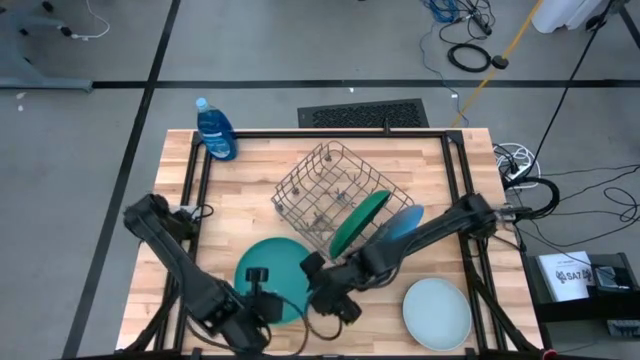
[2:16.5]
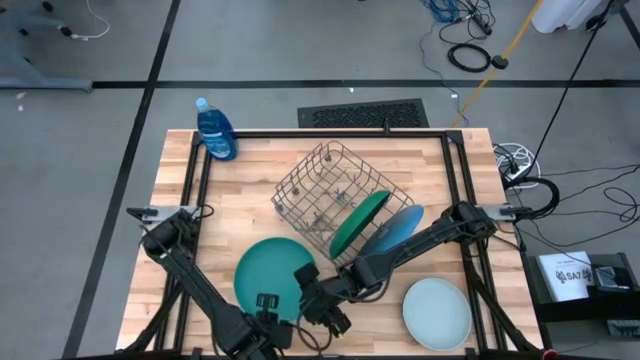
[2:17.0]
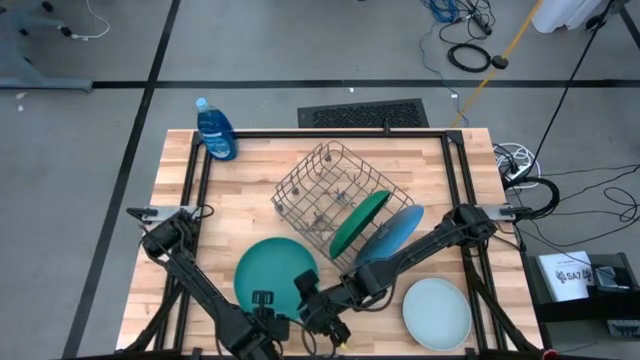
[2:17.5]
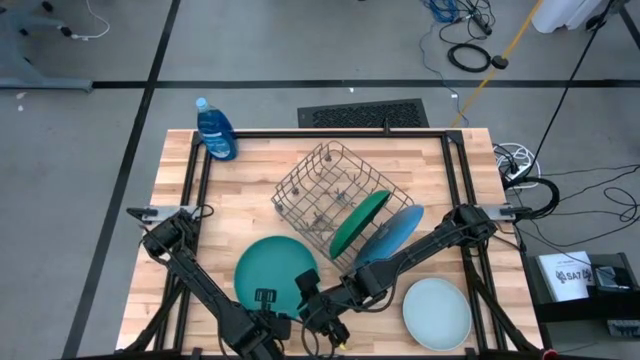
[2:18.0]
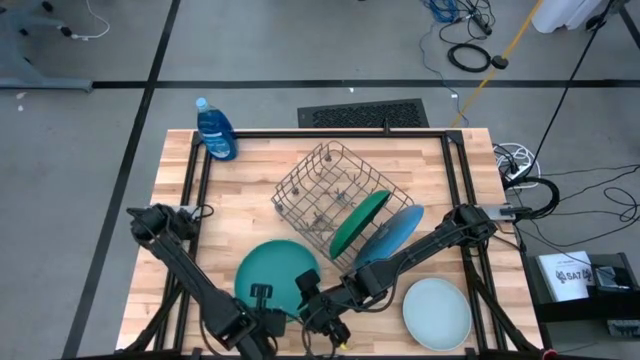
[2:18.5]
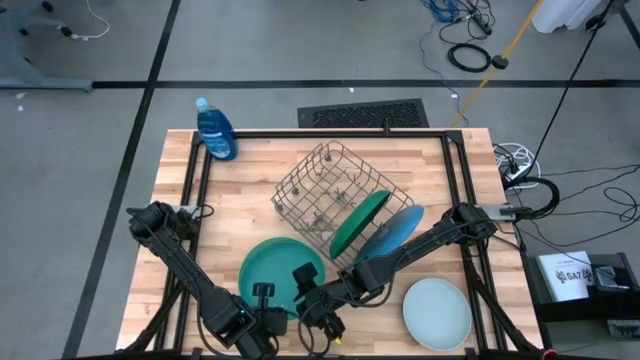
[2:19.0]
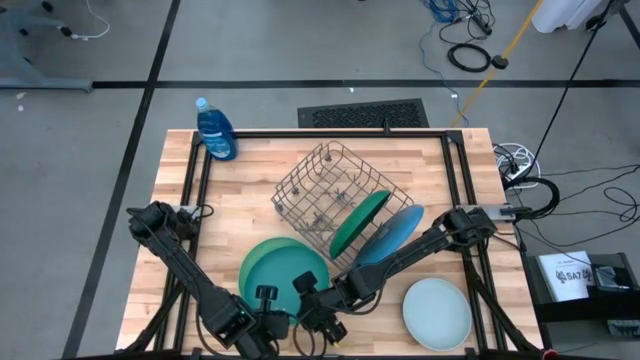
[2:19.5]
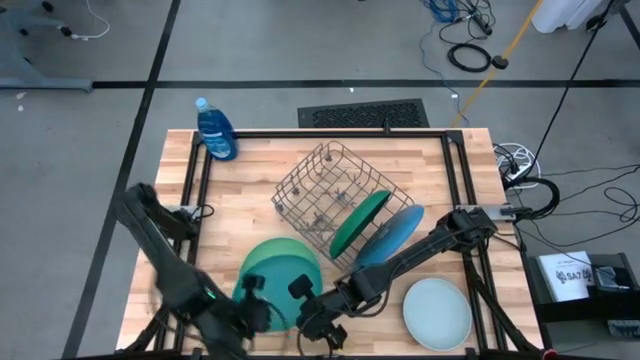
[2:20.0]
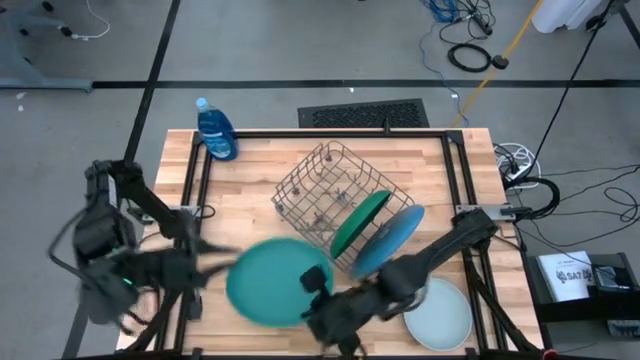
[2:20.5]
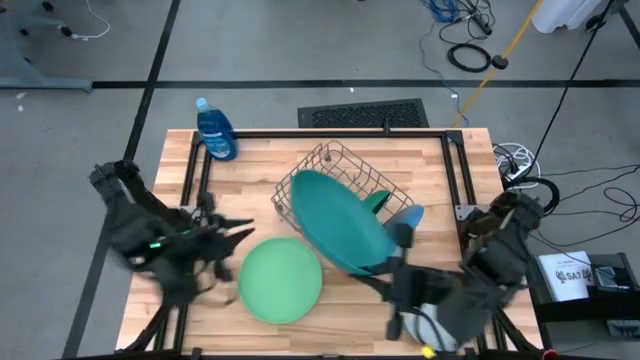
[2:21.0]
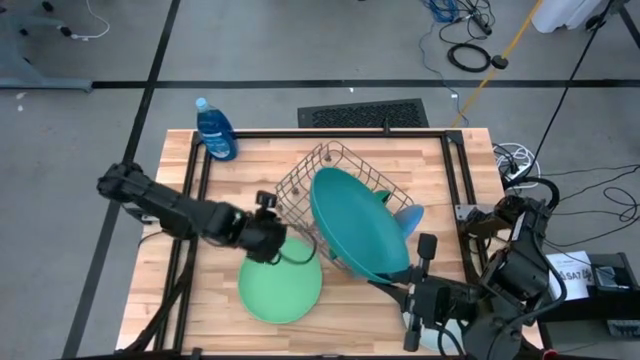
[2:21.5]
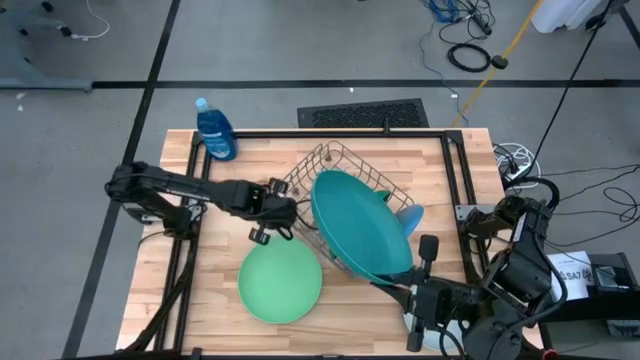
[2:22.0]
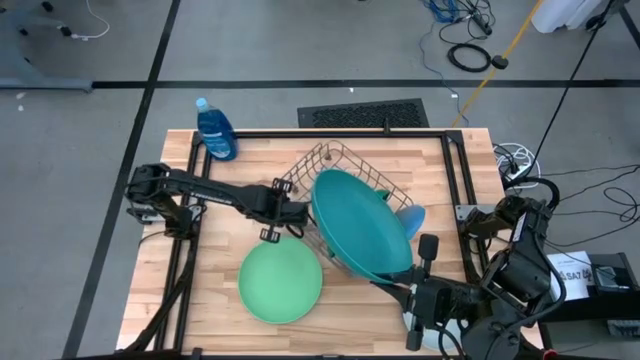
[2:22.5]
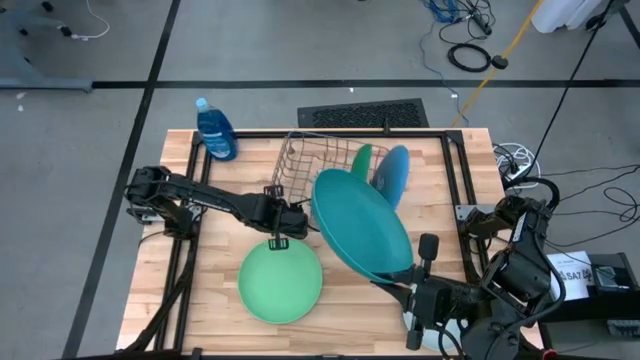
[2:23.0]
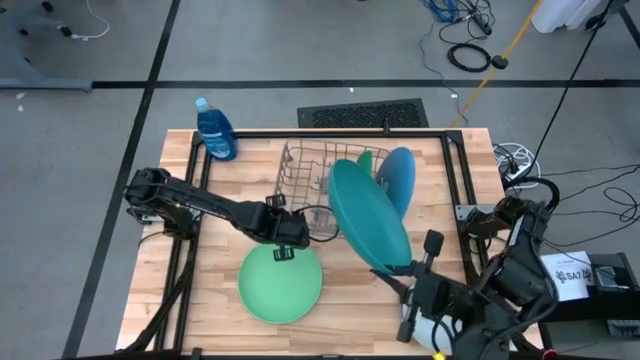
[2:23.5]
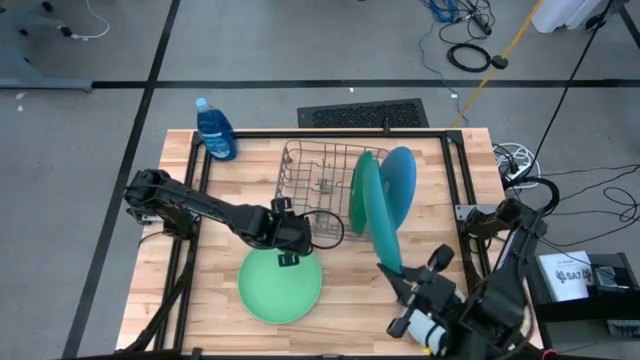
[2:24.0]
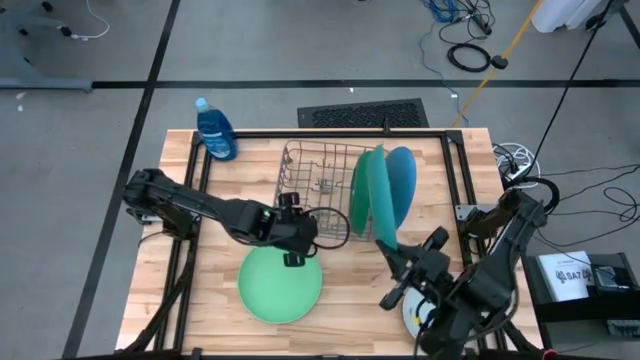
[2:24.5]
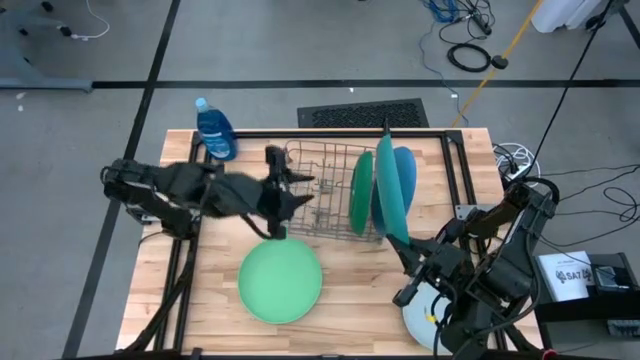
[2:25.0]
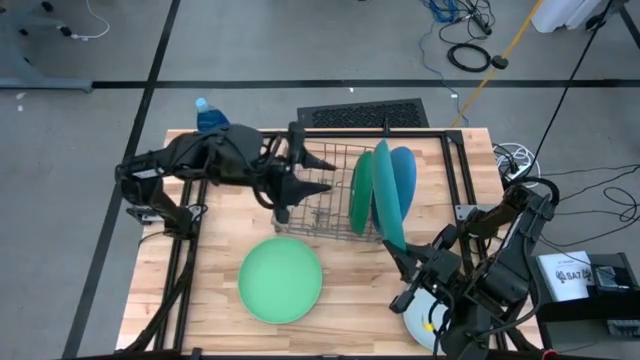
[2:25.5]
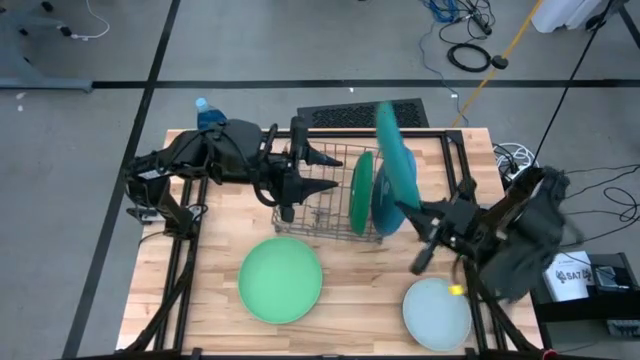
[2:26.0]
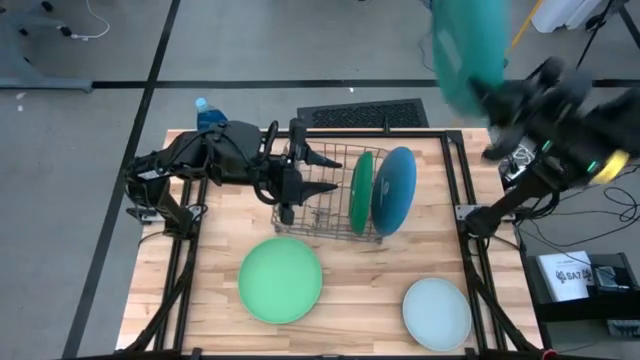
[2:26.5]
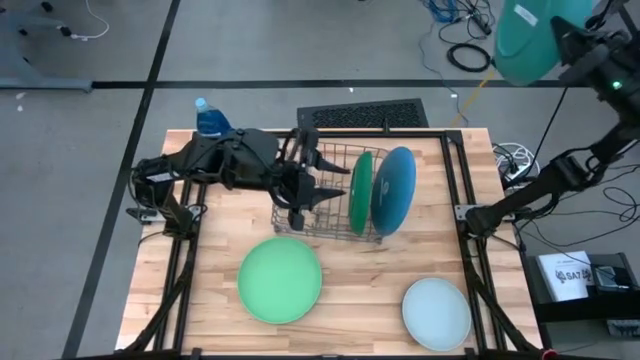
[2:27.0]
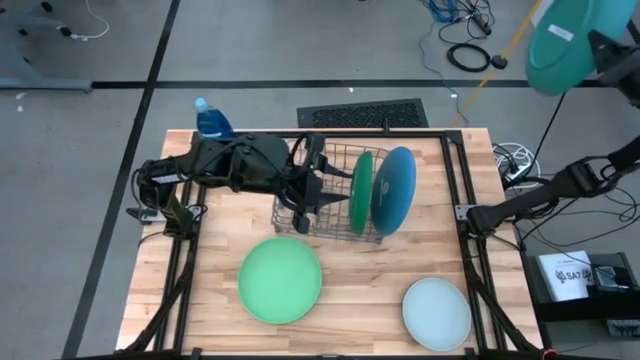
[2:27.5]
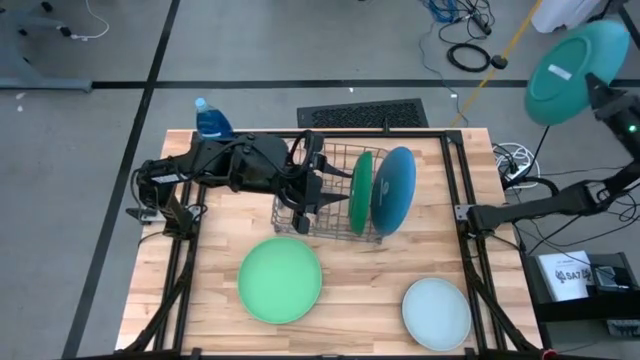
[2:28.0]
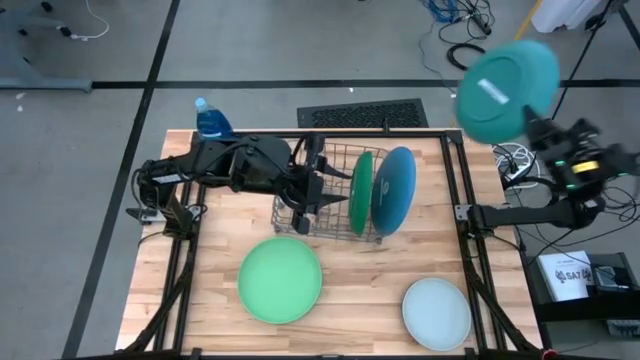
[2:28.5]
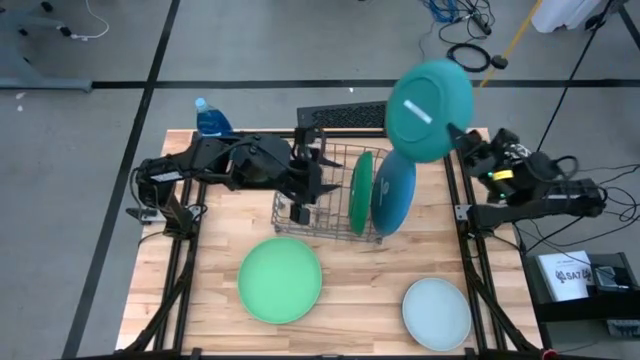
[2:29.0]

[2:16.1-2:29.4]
Task: Sort dishes
Put the green plate into the dish rack

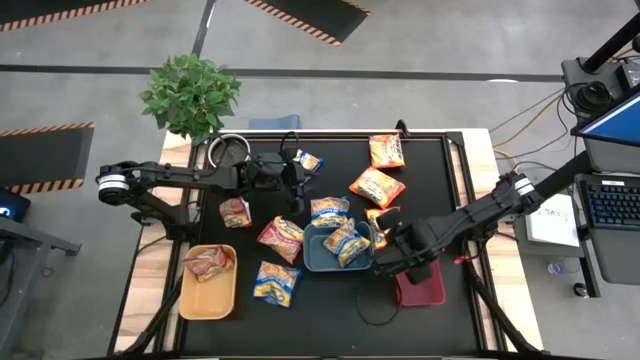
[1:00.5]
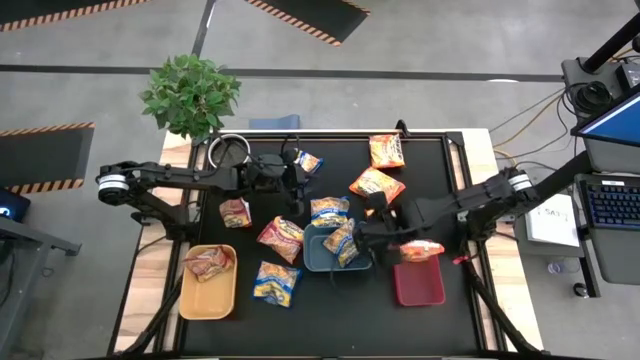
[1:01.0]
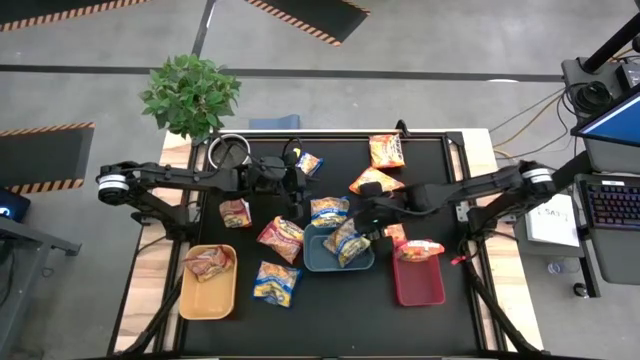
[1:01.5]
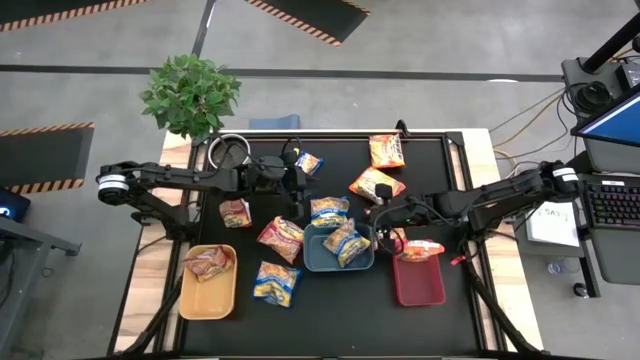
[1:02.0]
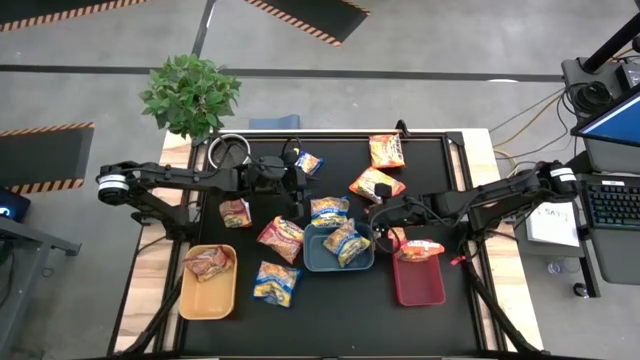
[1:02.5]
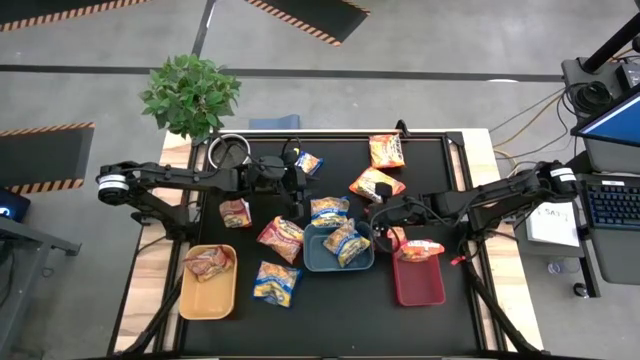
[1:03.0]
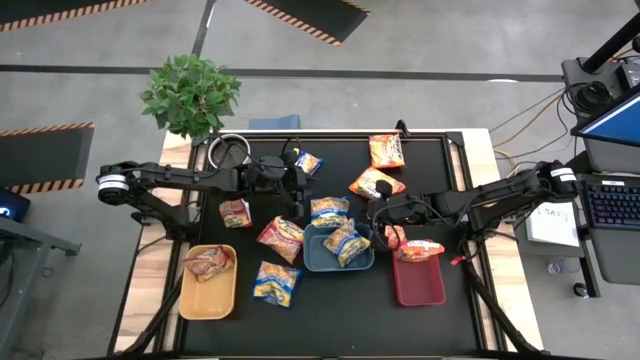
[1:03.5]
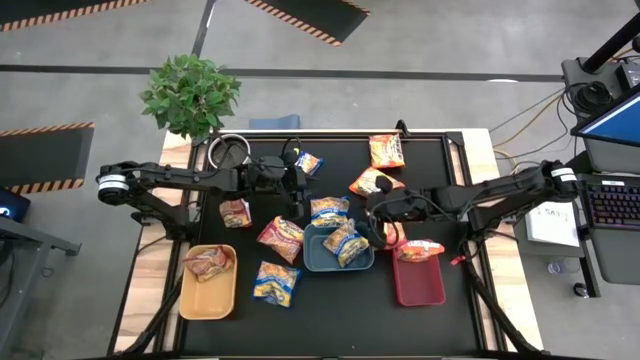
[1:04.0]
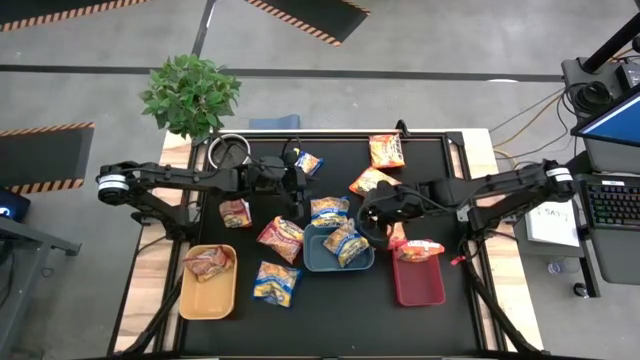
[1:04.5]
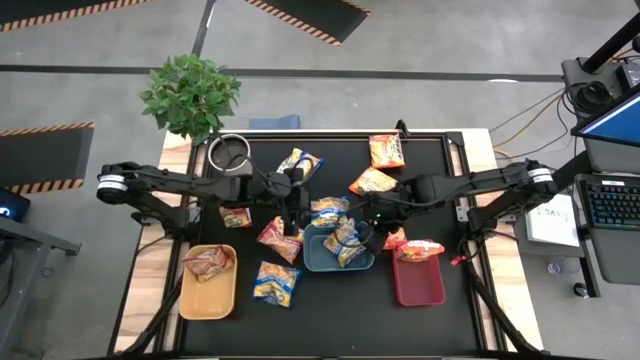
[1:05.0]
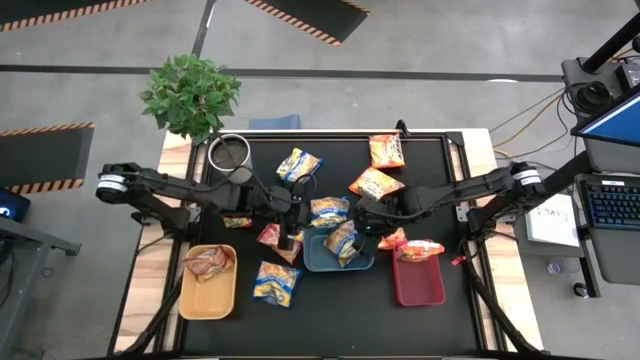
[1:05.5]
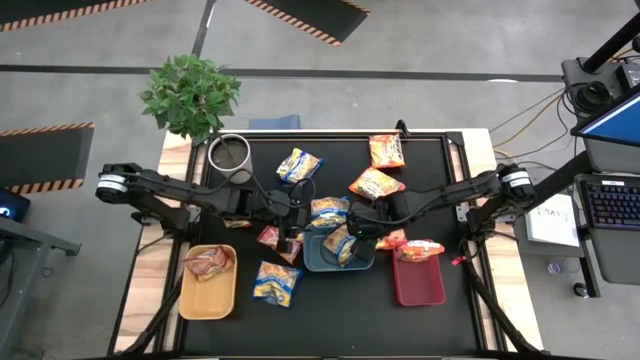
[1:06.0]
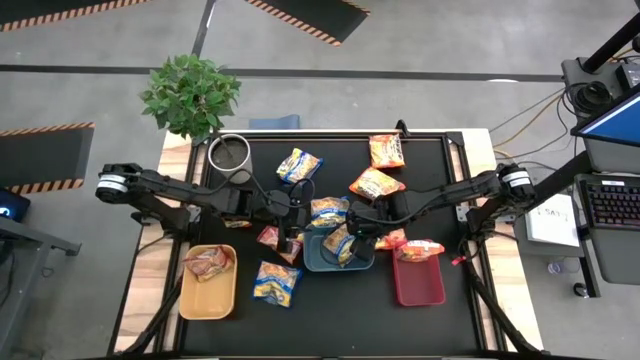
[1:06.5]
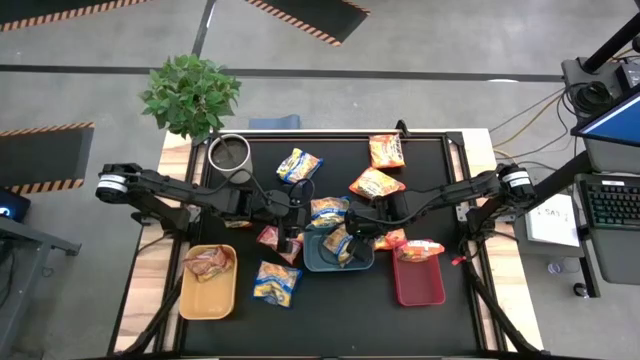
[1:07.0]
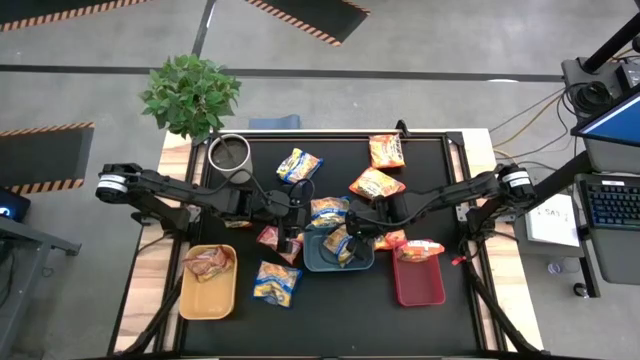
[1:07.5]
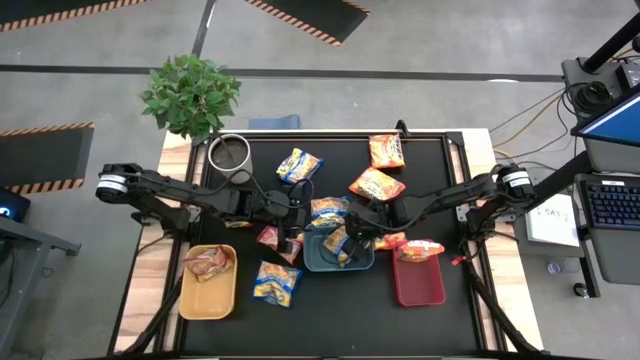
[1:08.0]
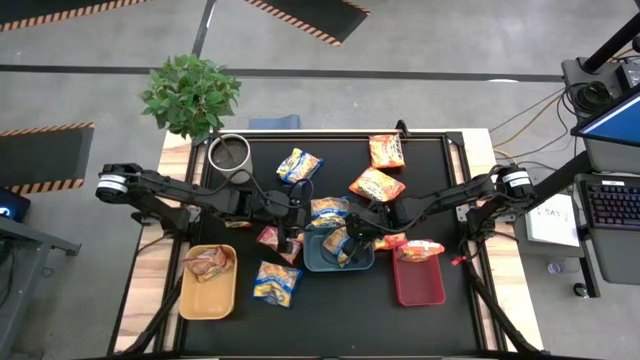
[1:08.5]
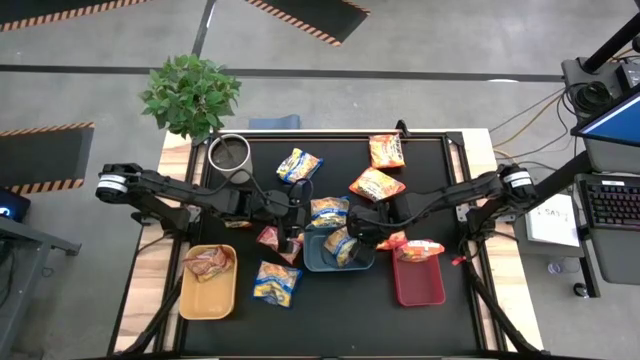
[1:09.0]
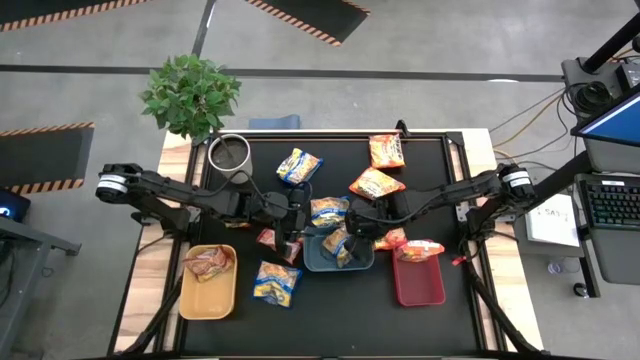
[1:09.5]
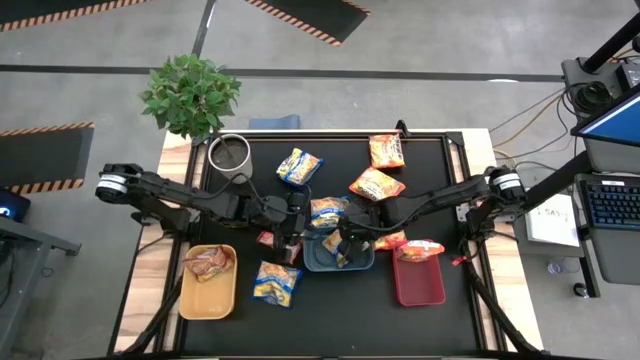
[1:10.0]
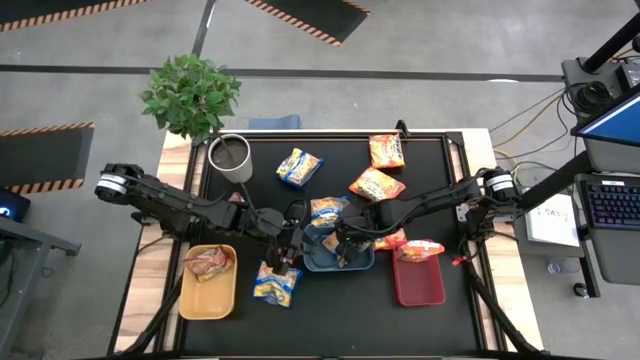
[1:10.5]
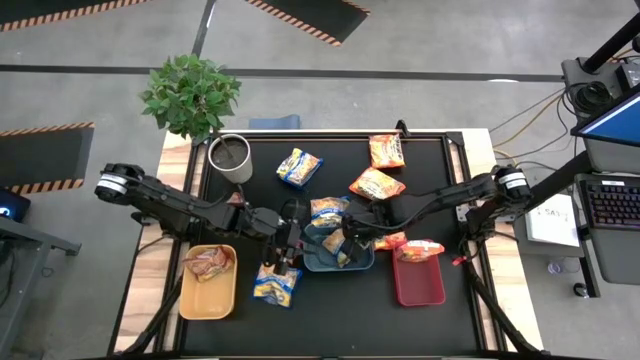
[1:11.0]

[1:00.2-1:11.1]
Task: Sort Maruchan noodles
Adjust the blue noodle pack
